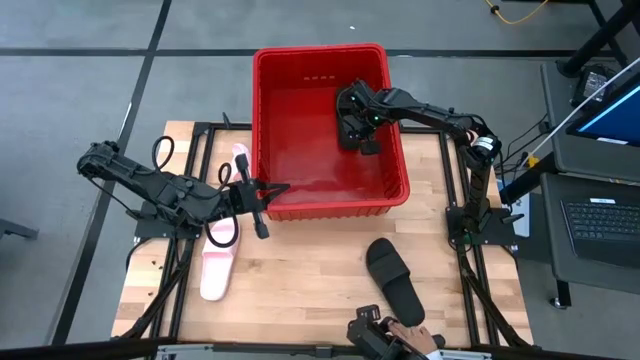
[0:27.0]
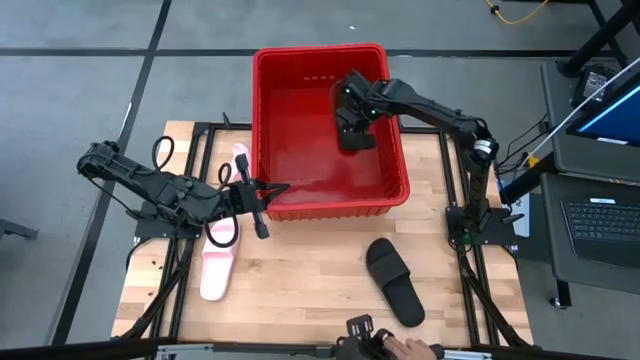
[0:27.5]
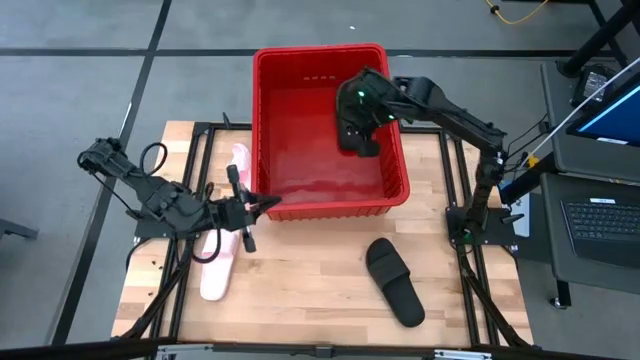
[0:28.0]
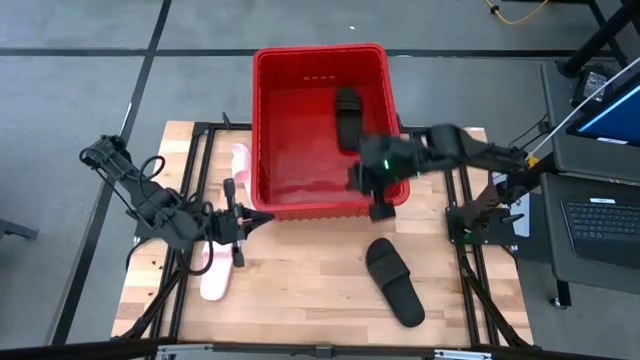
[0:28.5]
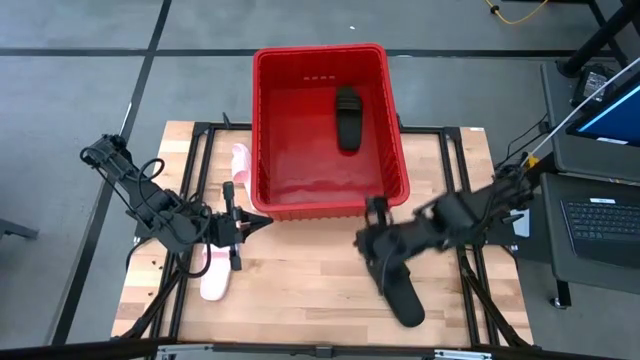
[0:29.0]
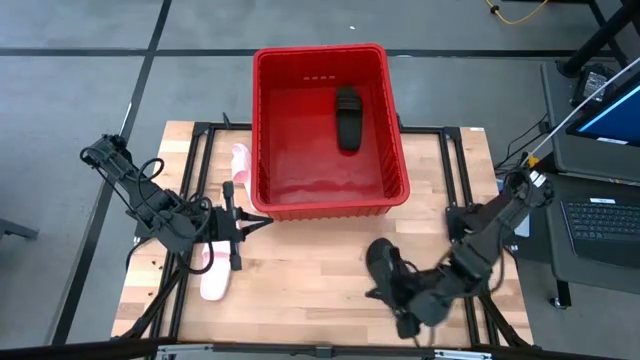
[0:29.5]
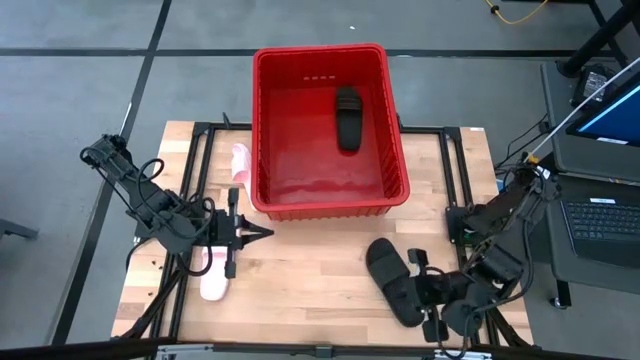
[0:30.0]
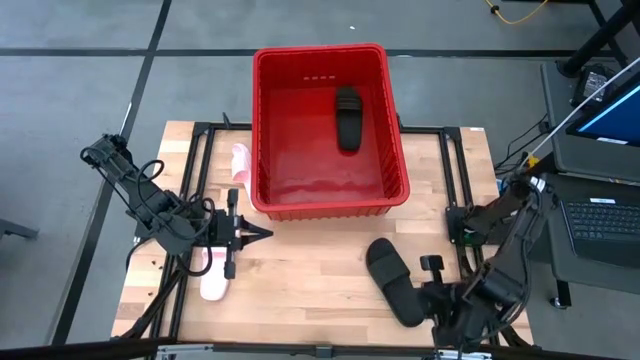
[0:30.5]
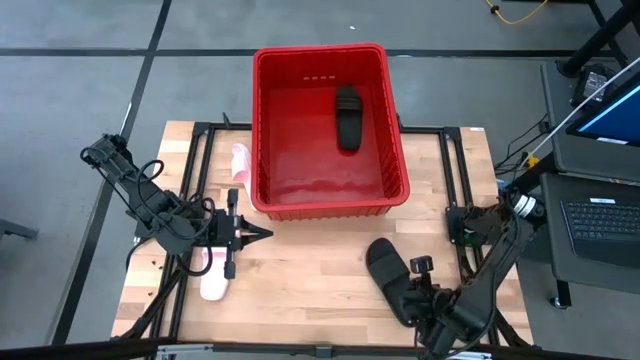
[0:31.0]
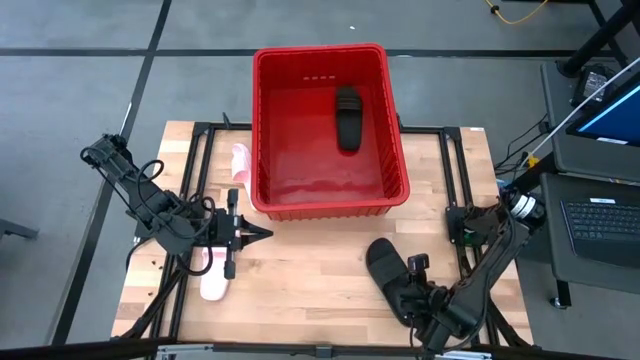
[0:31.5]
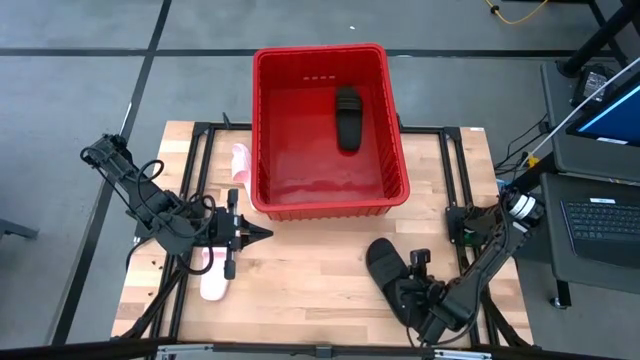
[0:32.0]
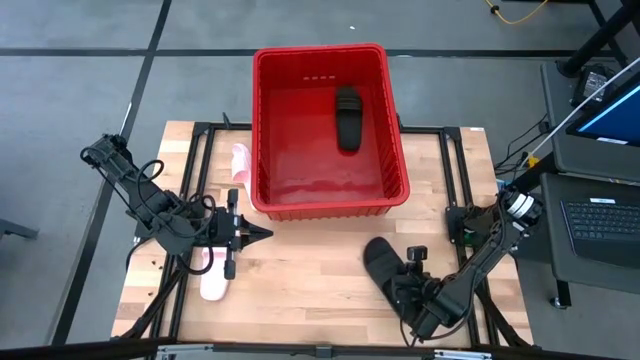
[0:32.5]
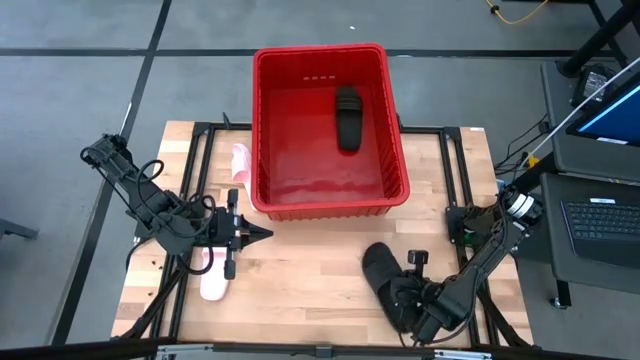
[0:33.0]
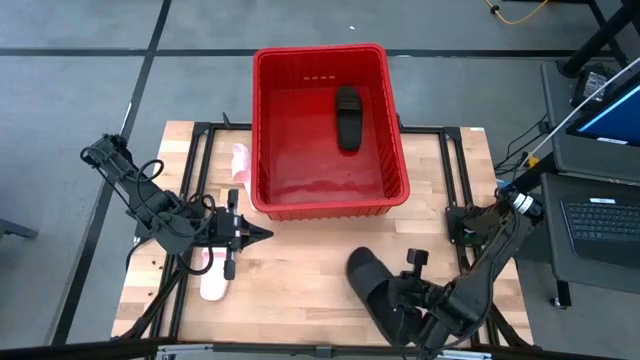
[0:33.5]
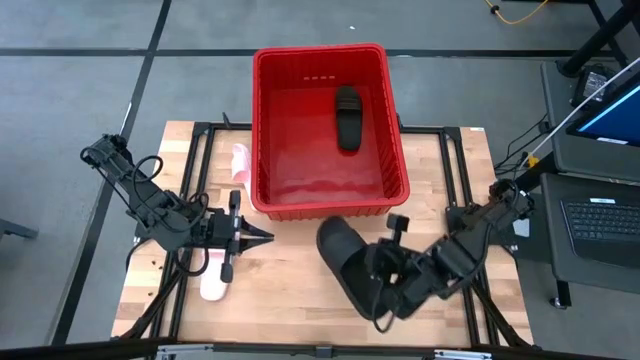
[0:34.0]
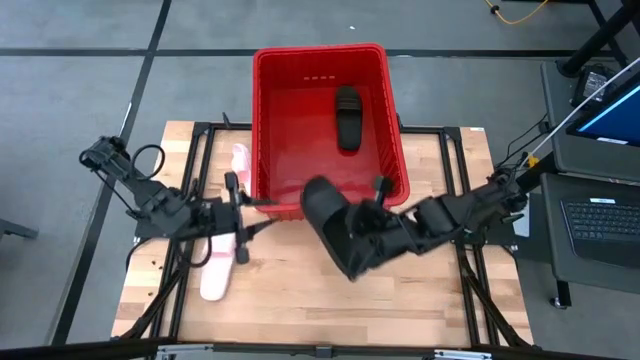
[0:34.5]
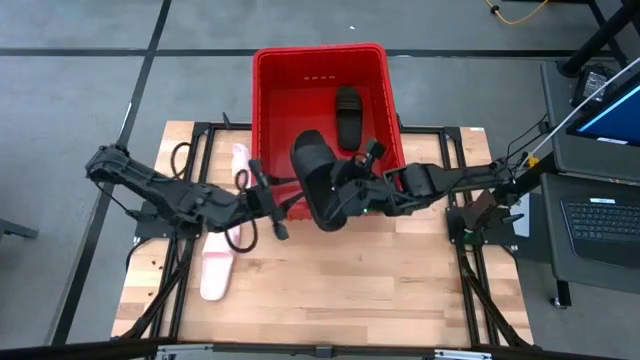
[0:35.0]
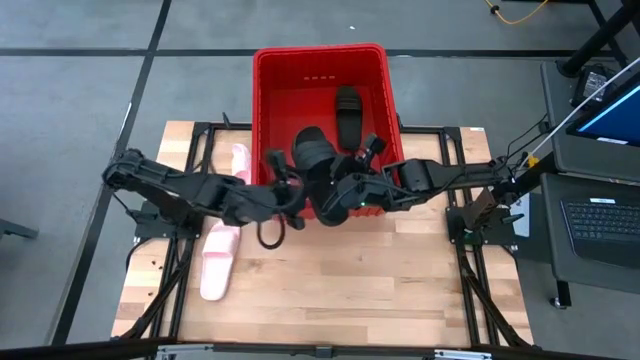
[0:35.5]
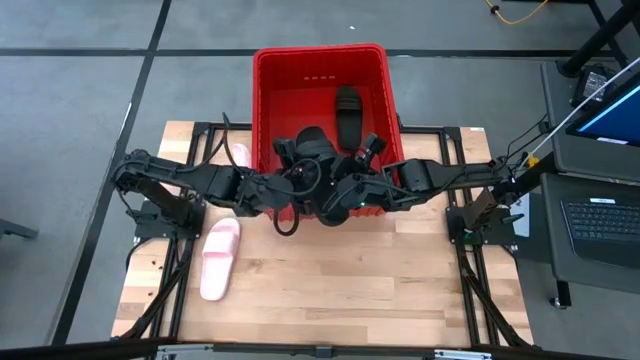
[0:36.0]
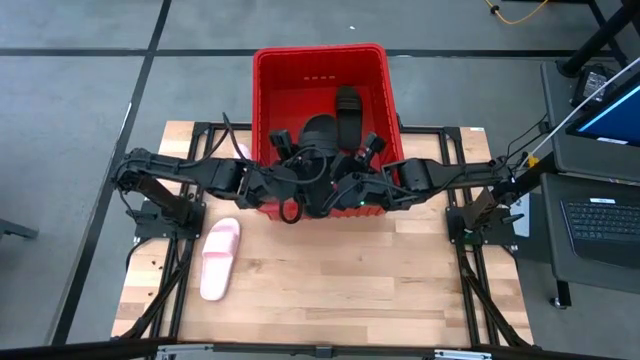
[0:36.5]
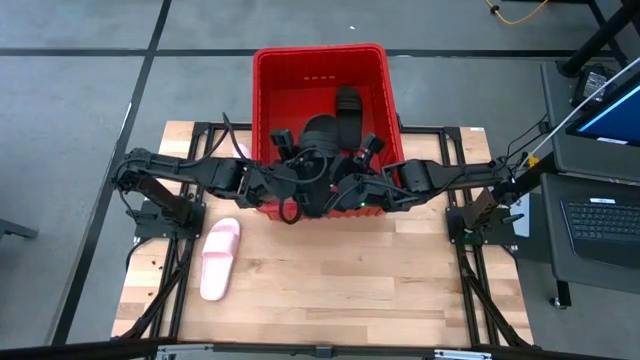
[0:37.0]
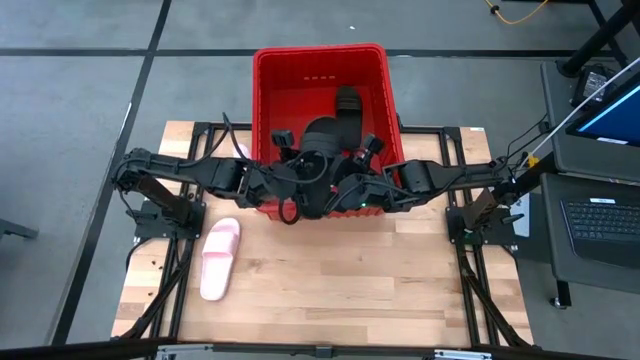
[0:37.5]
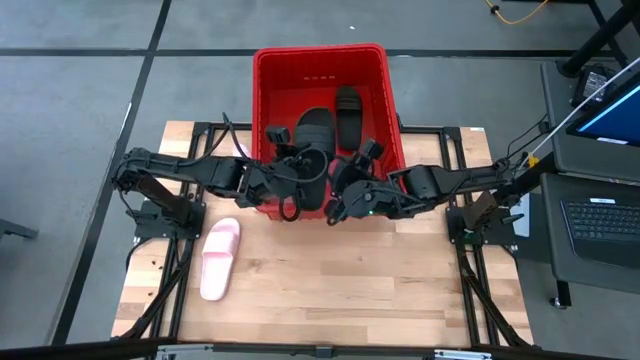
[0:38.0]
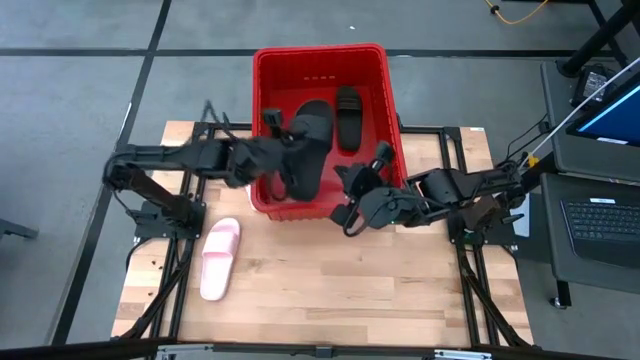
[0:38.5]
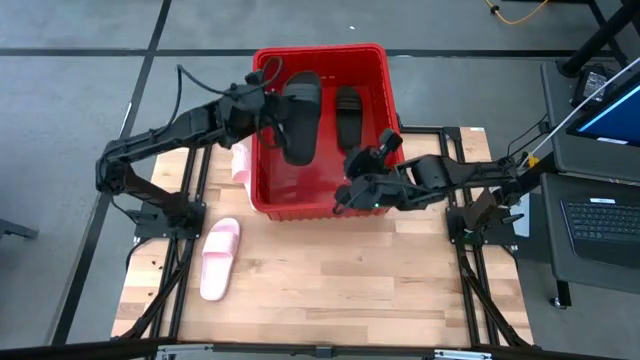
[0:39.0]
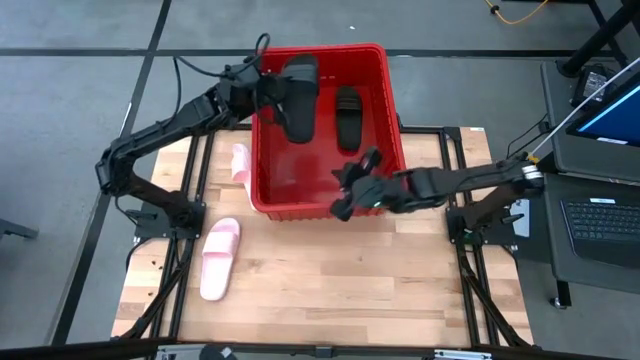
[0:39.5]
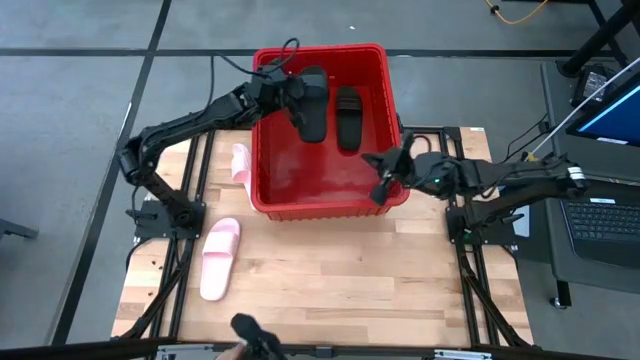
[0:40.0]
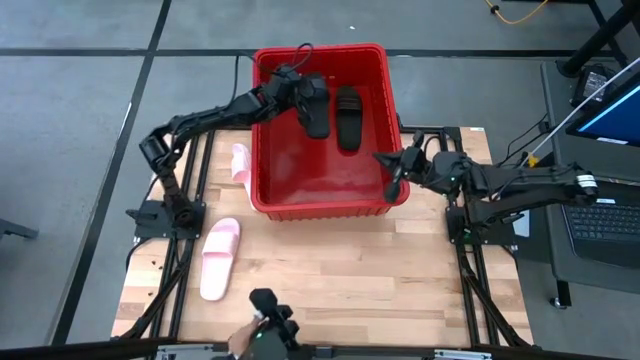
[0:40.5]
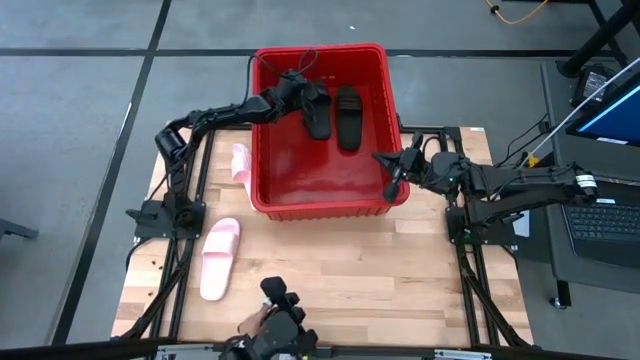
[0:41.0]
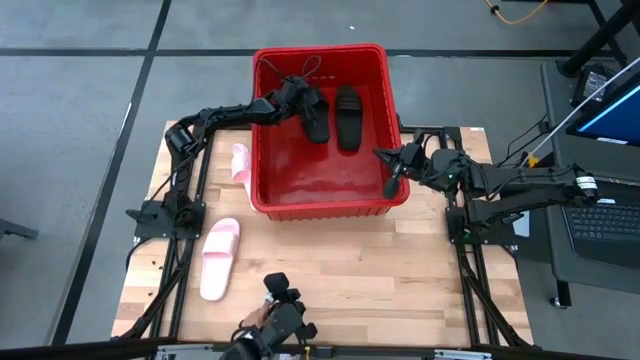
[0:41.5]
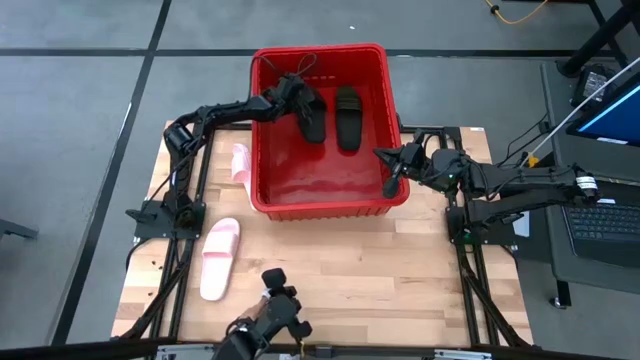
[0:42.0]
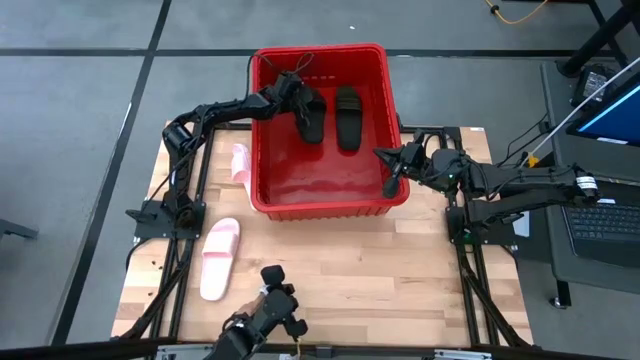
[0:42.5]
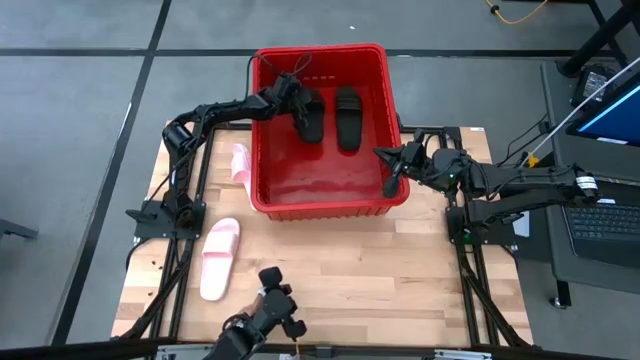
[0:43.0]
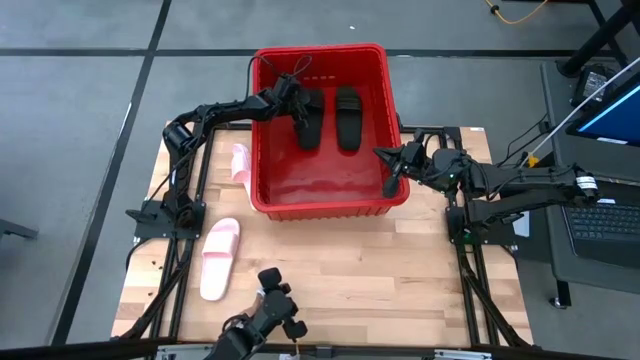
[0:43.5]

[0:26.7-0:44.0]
Task: Pick and place slides into bin
Put the black slide in the red bin

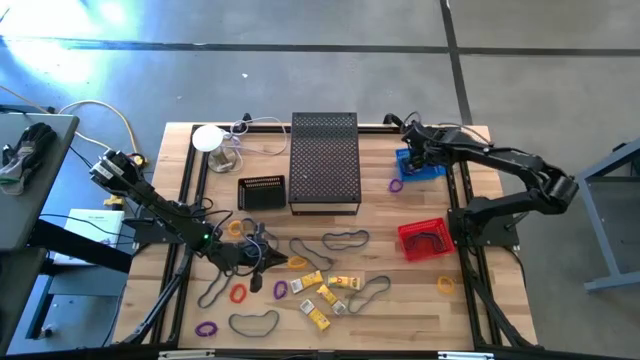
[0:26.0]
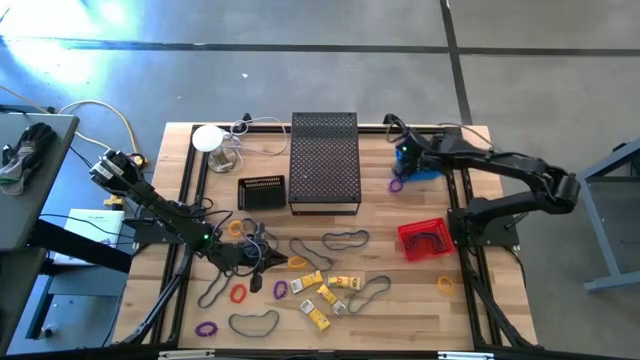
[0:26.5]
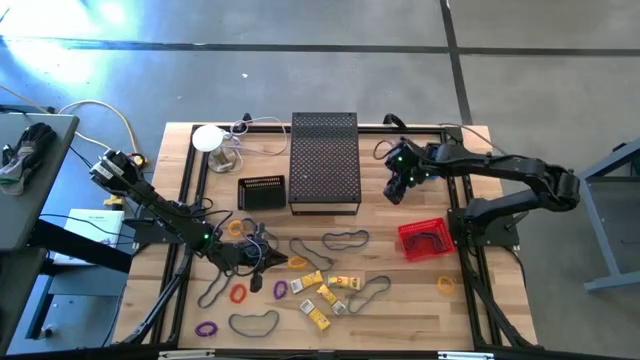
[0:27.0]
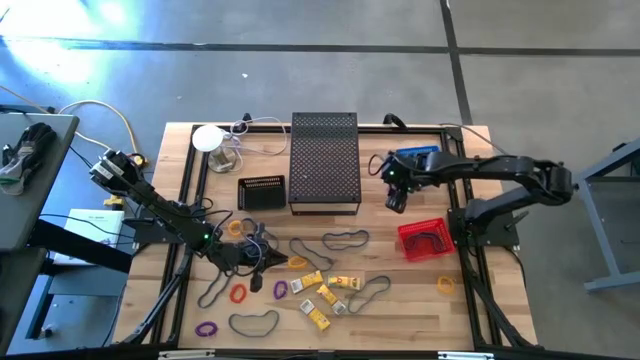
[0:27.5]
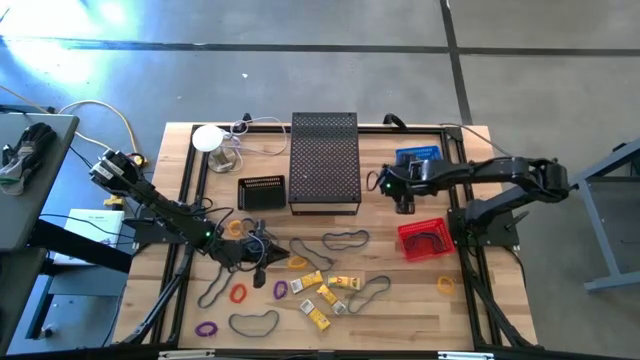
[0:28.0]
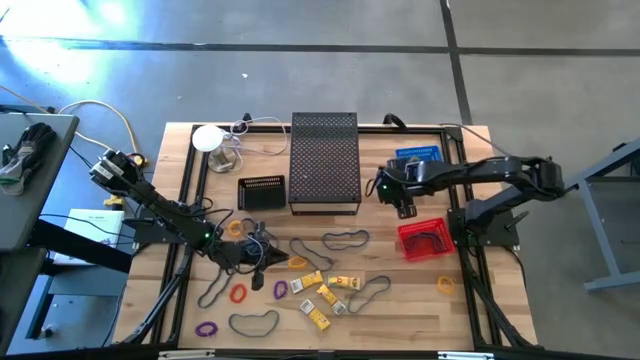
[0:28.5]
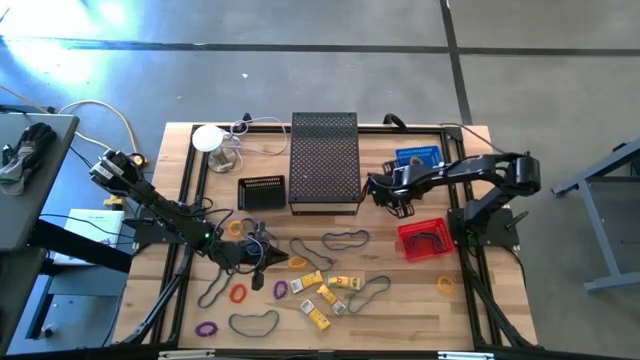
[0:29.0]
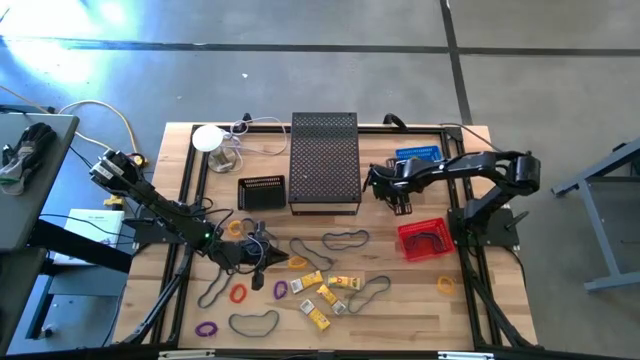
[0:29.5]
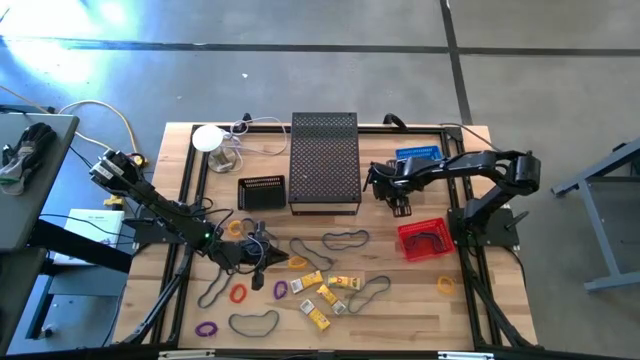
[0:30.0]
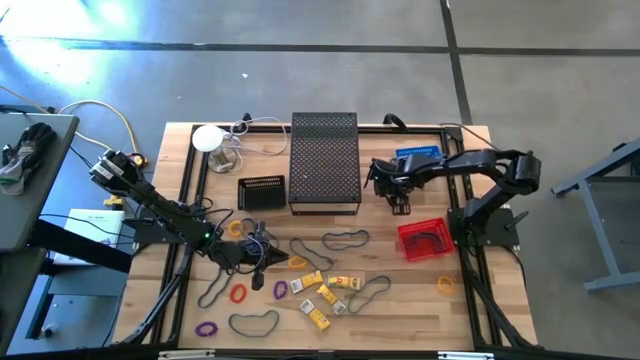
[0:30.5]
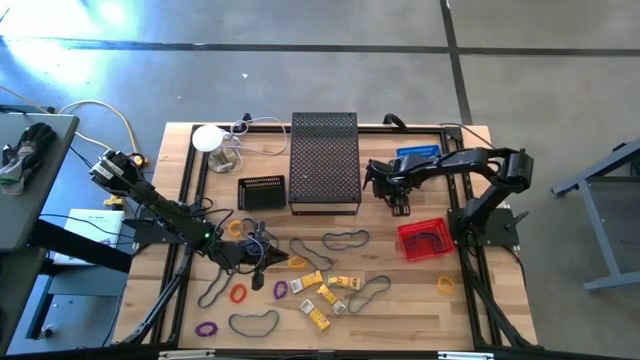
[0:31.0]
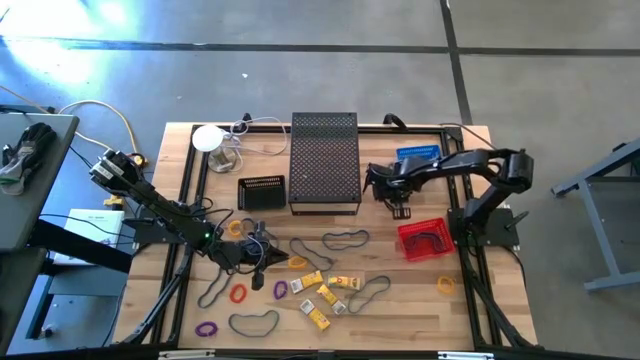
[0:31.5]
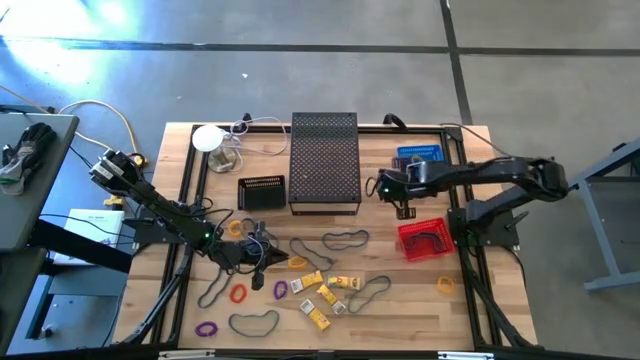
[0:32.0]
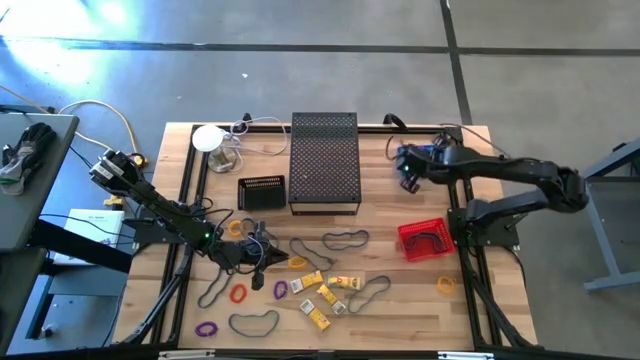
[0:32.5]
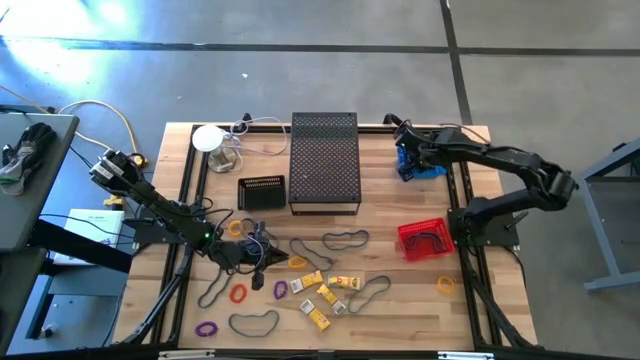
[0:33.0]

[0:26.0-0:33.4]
Task: Pick & Place Office Desk Supplies
Put the violet spring keychain into the blue bin
